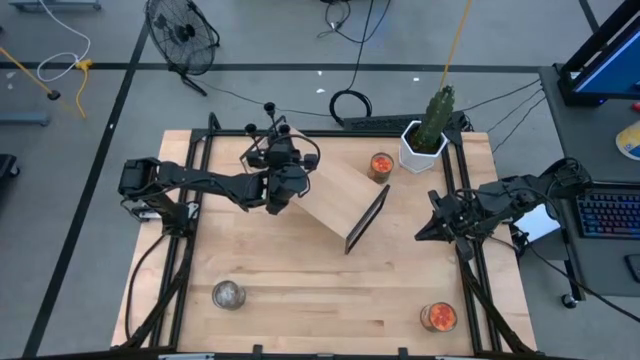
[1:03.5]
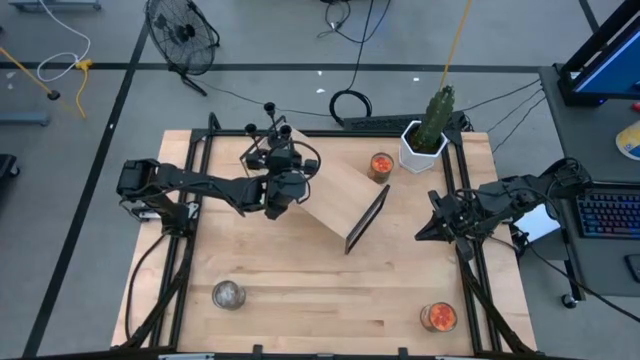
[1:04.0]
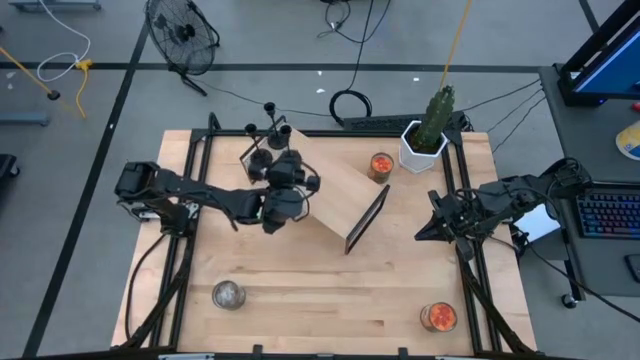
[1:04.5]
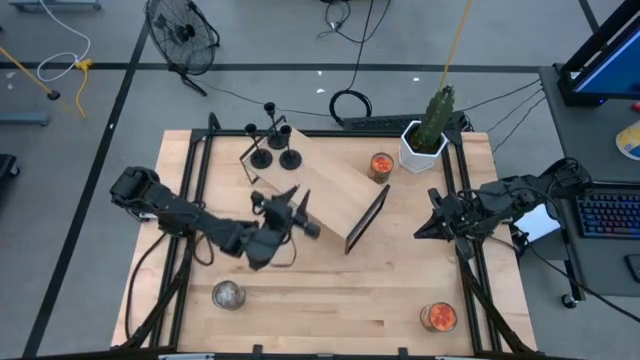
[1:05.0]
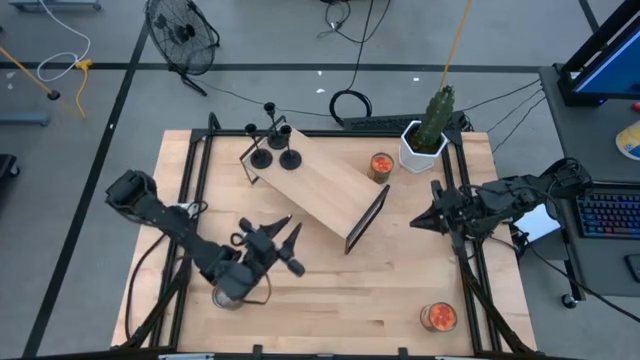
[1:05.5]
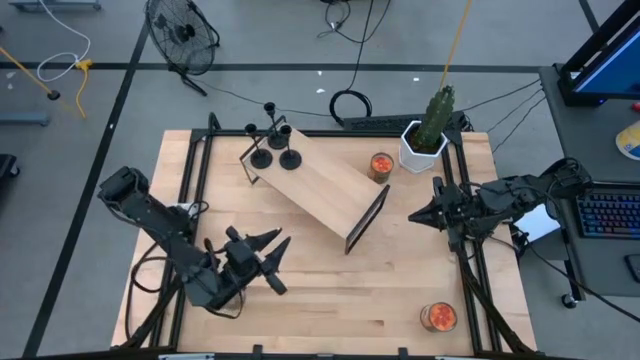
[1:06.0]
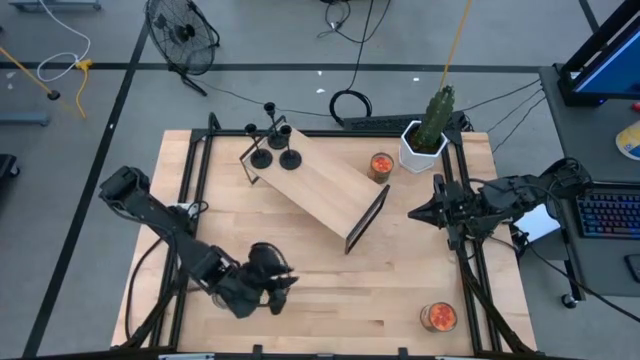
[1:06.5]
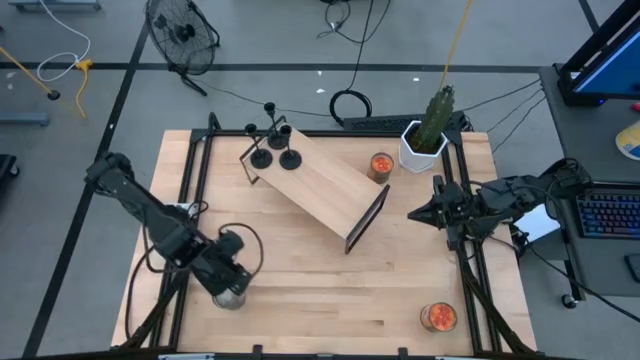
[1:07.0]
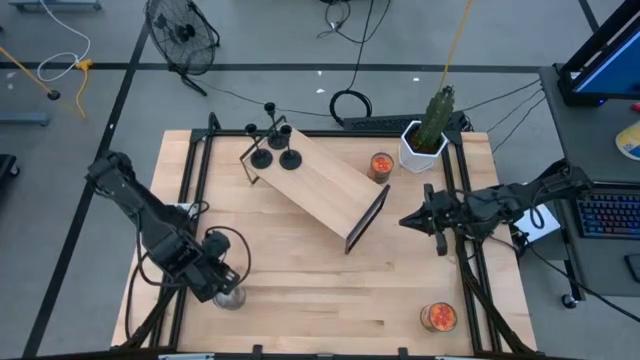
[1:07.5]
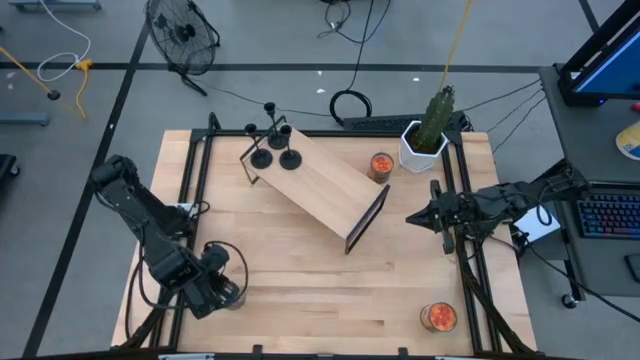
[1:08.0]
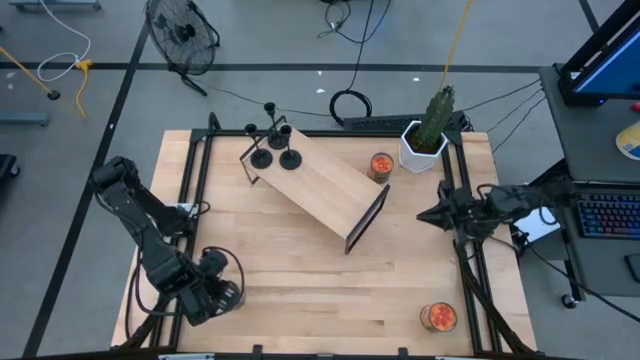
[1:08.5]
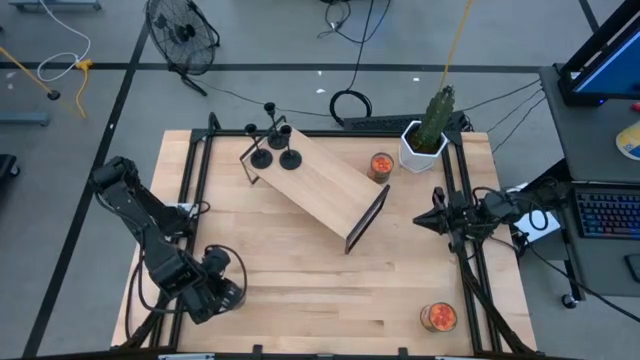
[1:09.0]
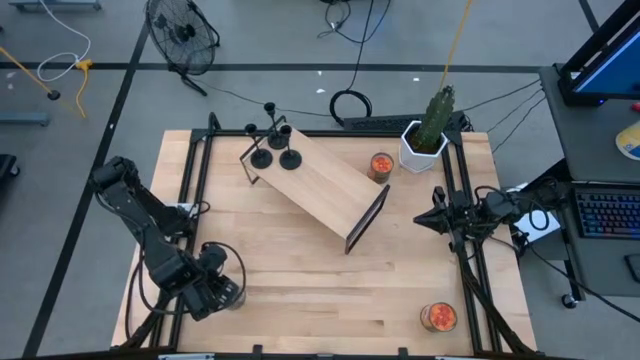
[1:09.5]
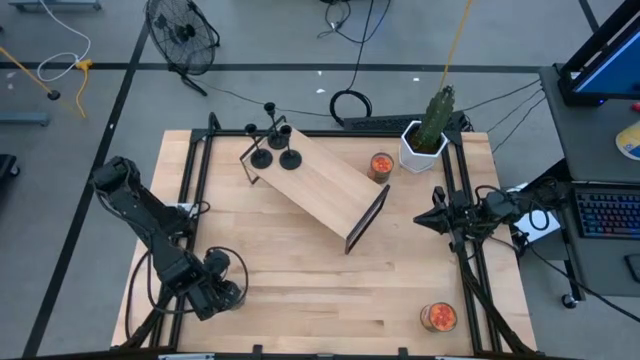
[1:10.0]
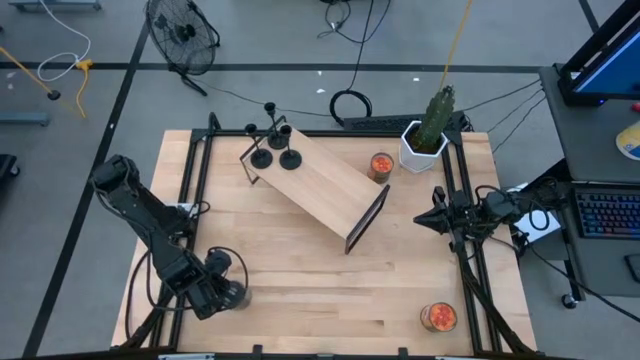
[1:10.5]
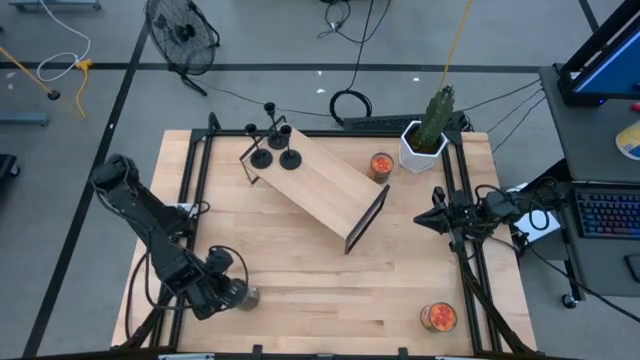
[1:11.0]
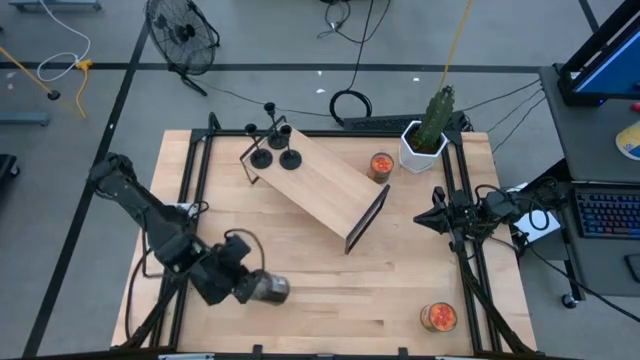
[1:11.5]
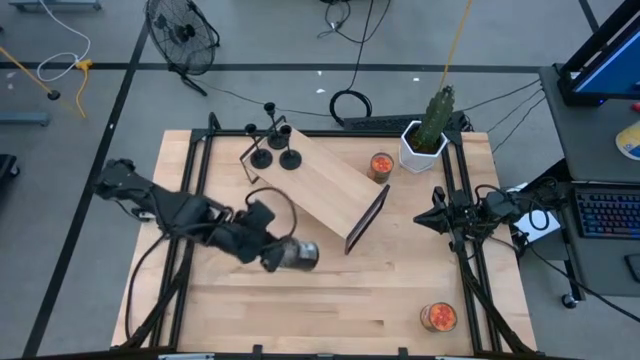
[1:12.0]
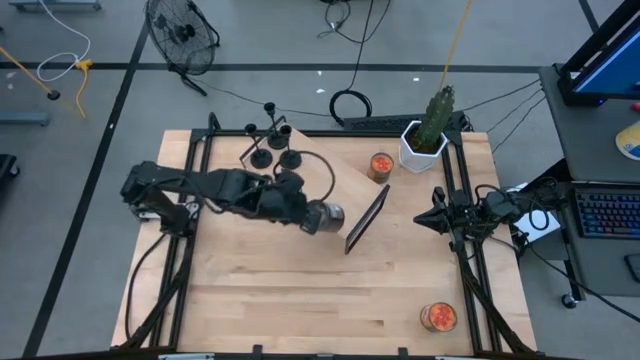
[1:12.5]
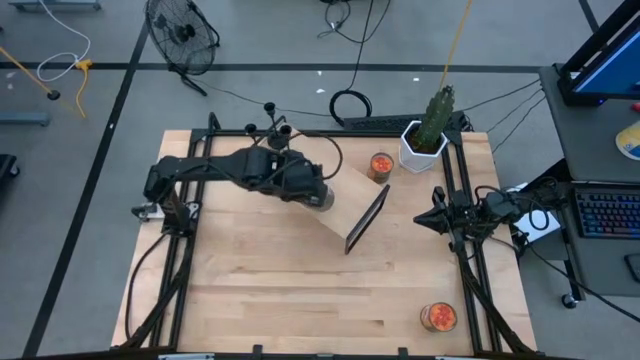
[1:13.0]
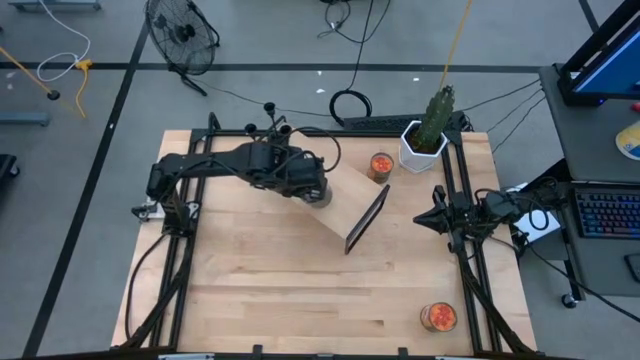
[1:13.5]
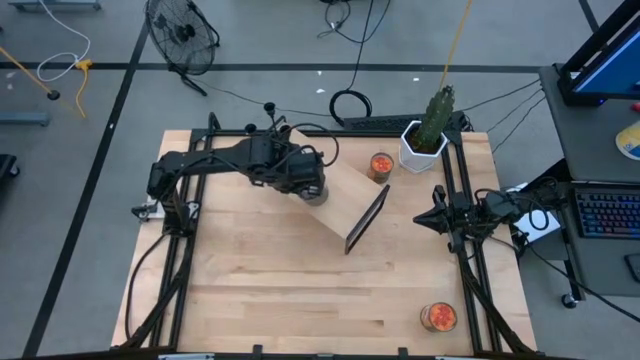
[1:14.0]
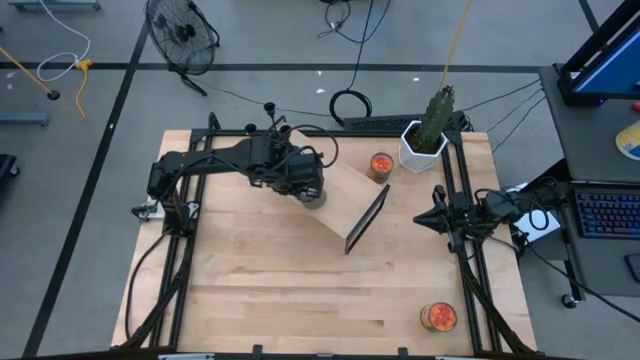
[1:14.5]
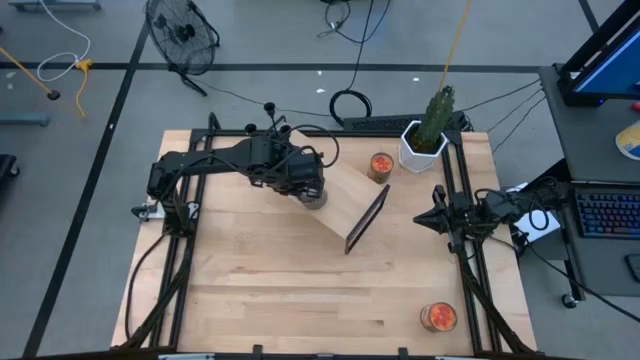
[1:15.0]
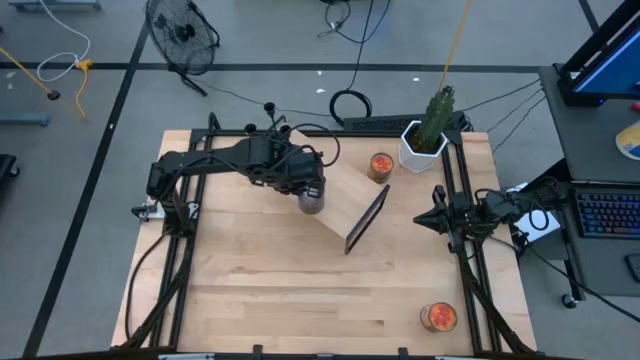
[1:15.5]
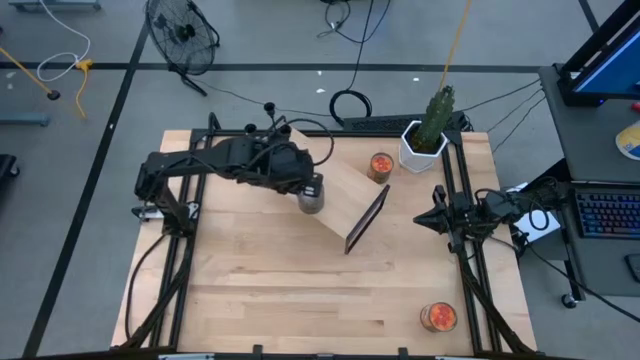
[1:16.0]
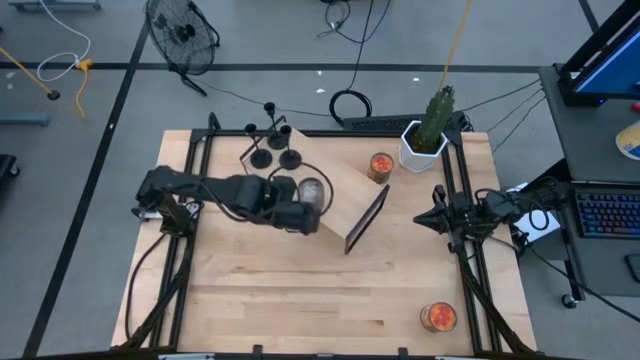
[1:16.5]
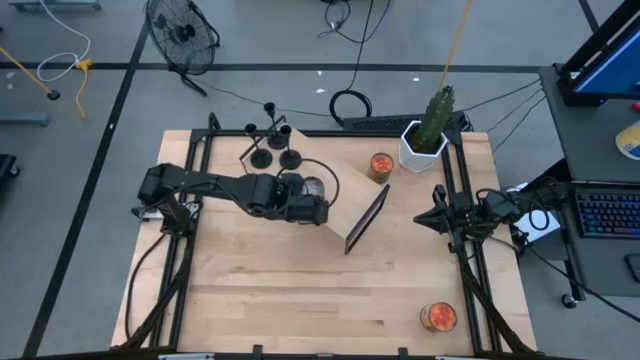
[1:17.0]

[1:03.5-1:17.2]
Task: Pick & Place candle stick holders
Put the brown scented candle on the shelf

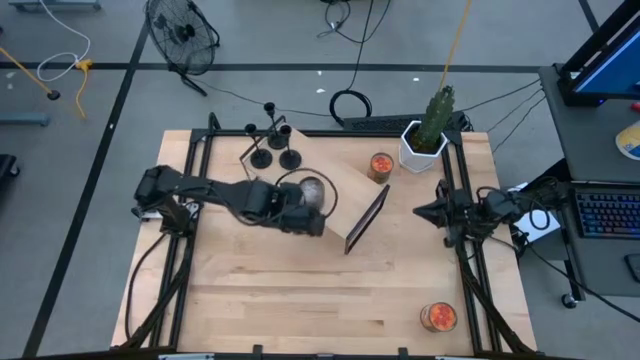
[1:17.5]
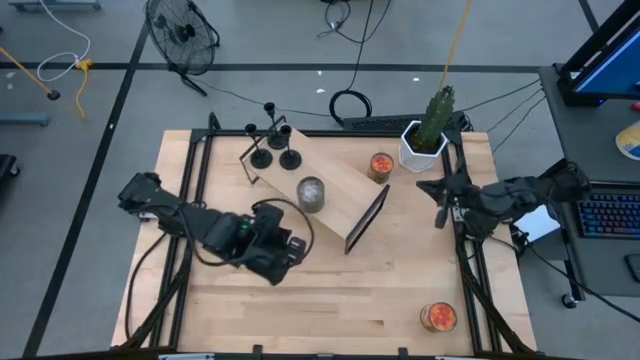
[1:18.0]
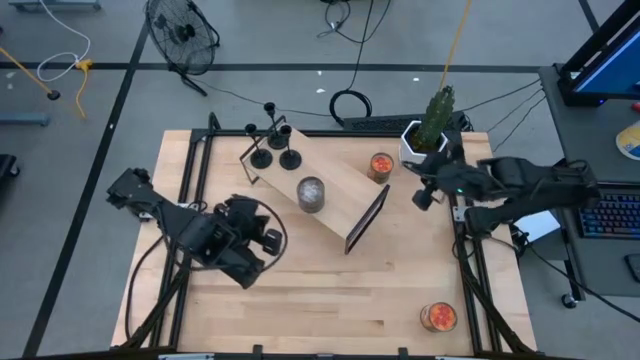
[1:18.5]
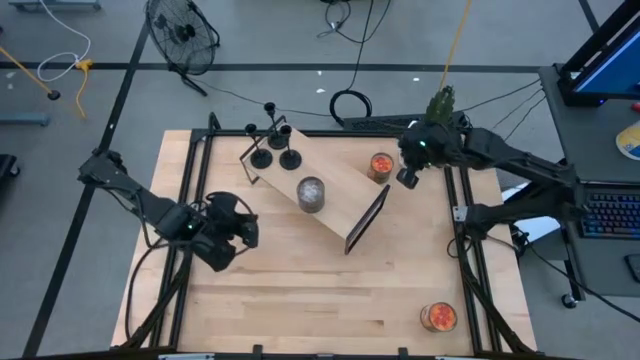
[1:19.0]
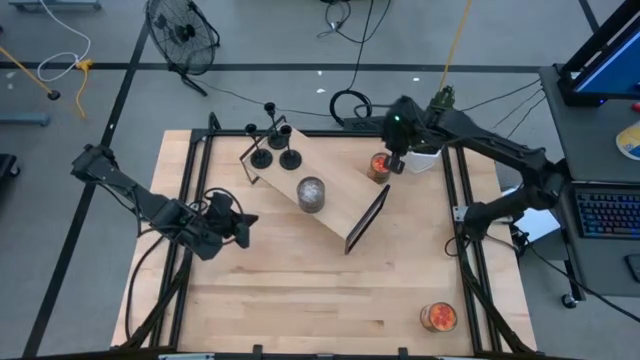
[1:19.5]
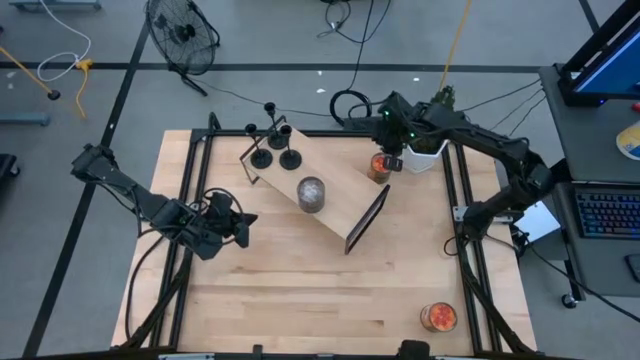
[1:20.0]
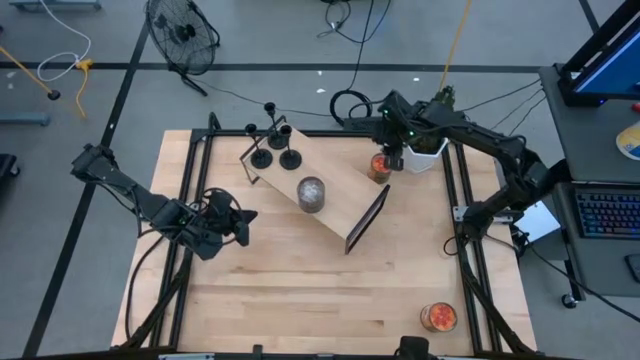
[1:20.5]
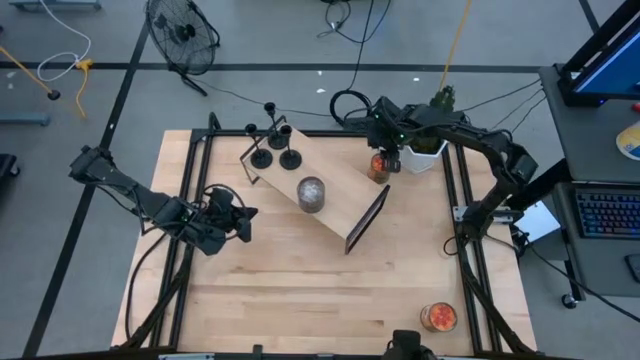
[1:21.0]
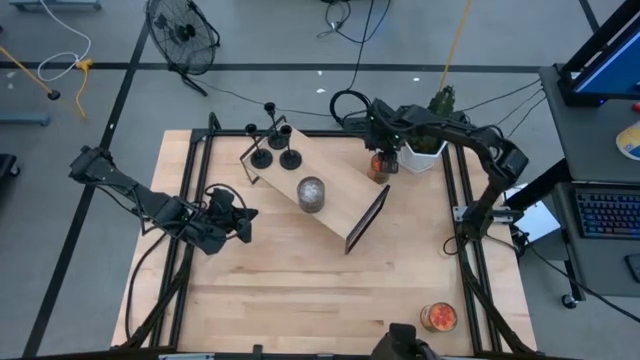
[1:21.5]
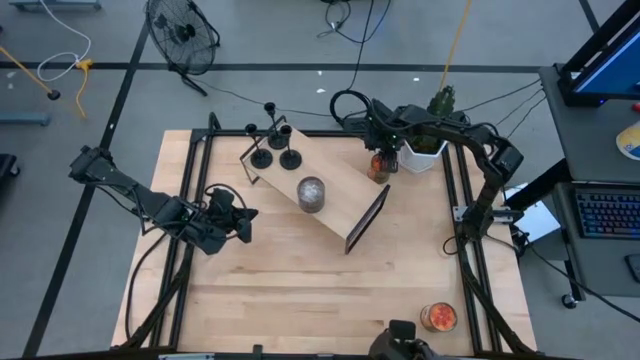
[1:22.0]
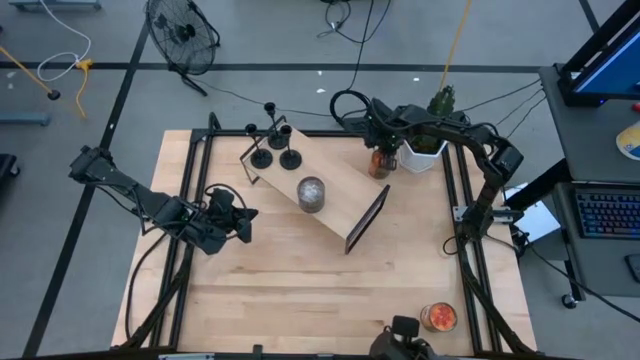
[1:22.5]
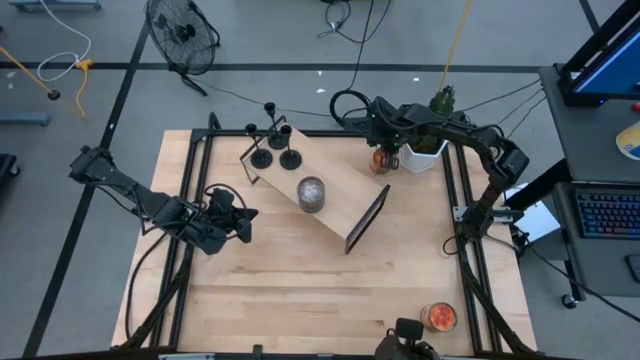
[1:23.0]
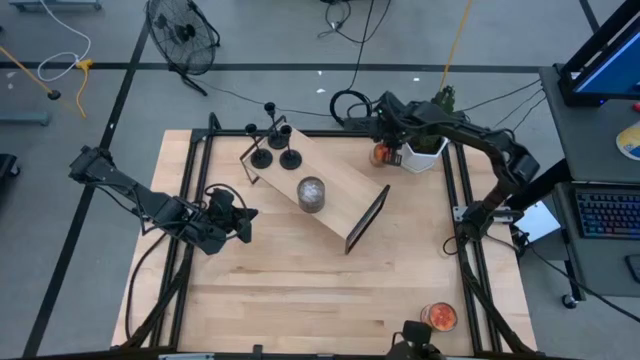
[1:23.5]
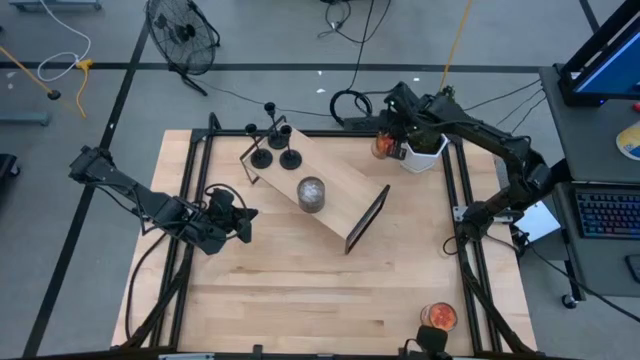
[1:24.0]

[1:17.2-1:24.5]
Put the top orange scented candle aligned with the brown scented candle on the shelf

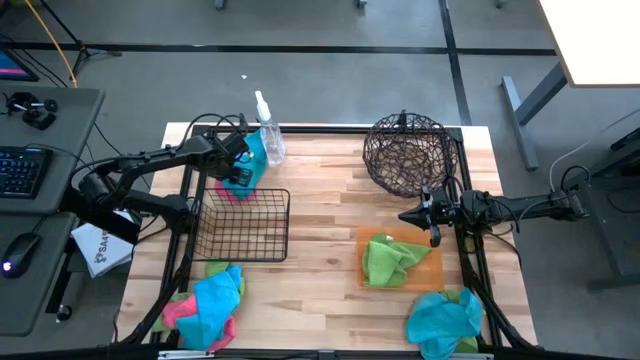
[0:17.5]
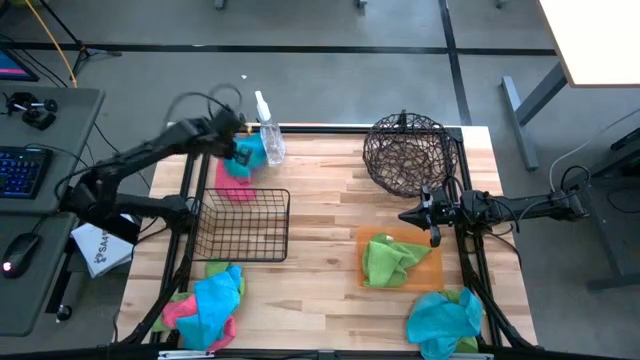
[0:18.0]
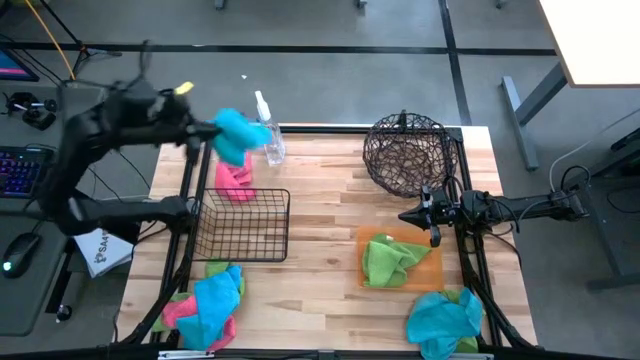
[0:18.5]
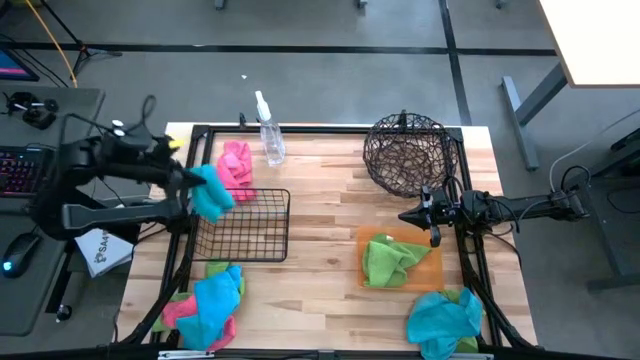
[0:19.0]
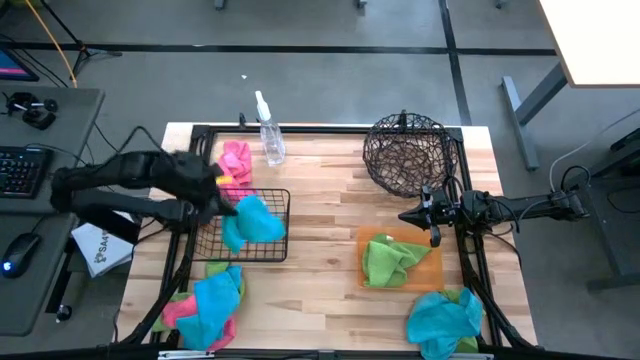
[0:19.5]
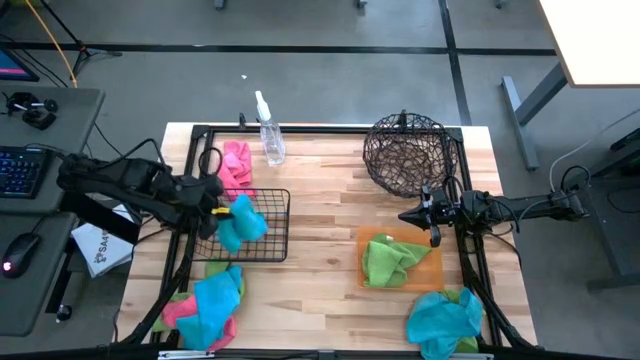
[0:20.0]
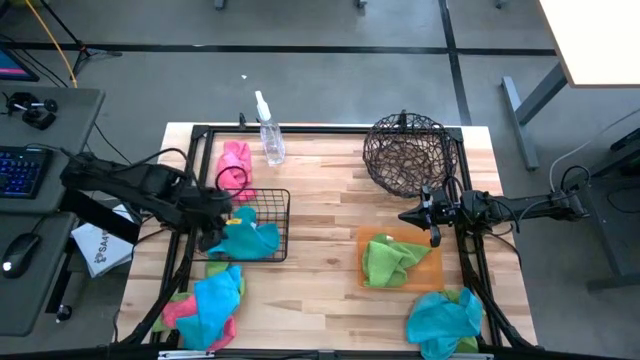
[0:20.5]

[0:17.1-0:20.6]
Task: Sort microfiber towel by color & place in baskets
Put the top blue microfiber towel into the left wire basket
